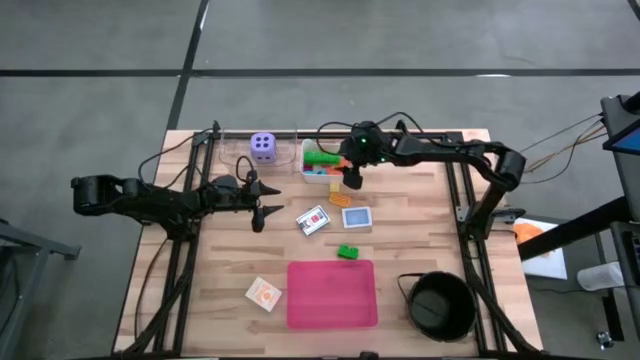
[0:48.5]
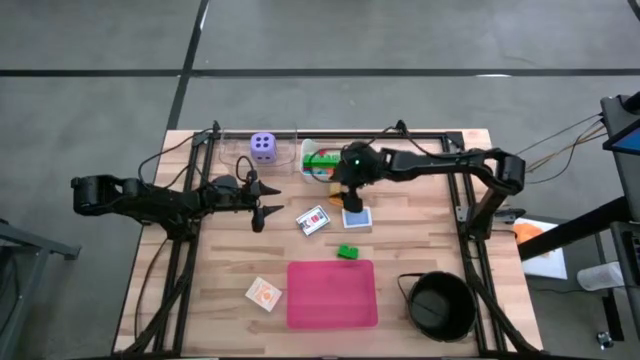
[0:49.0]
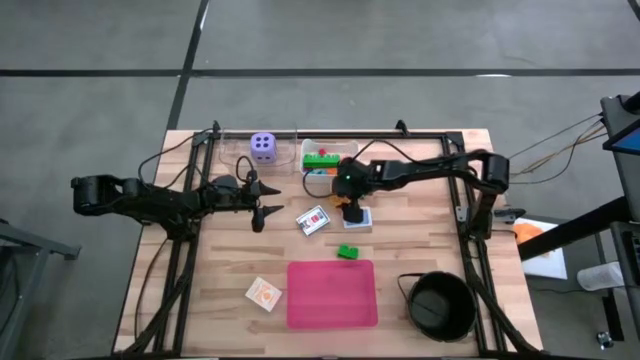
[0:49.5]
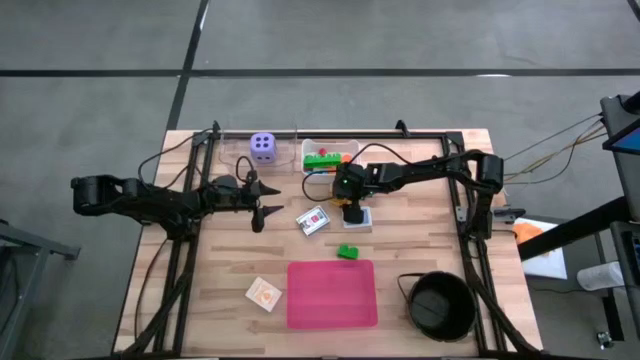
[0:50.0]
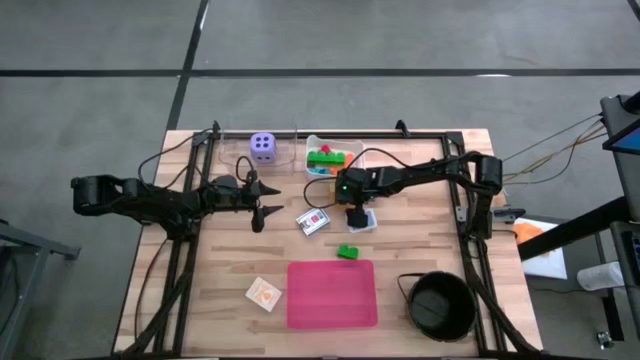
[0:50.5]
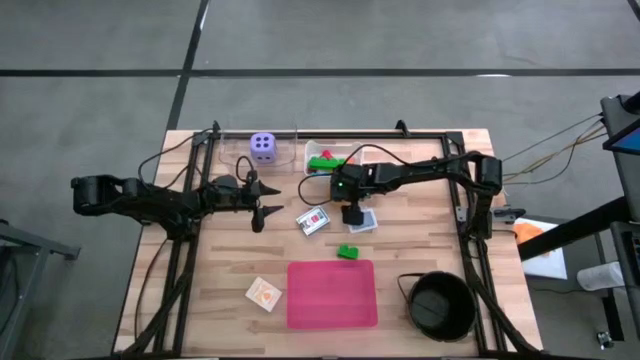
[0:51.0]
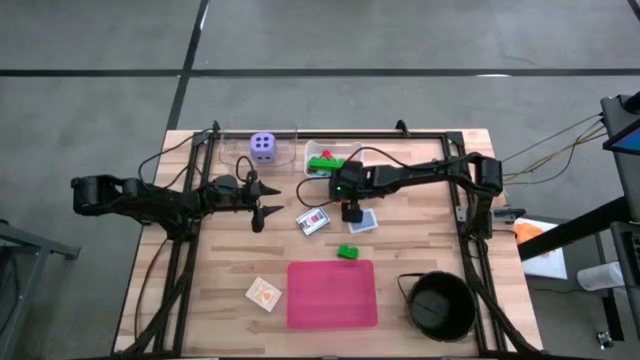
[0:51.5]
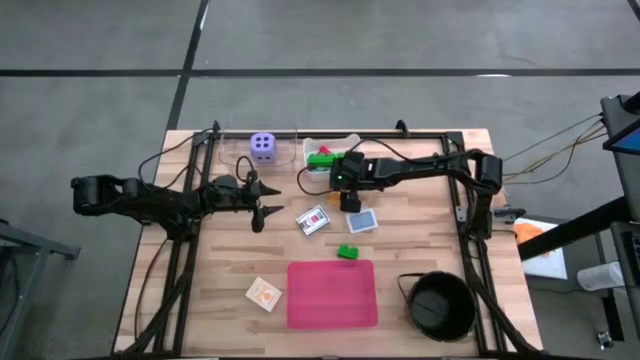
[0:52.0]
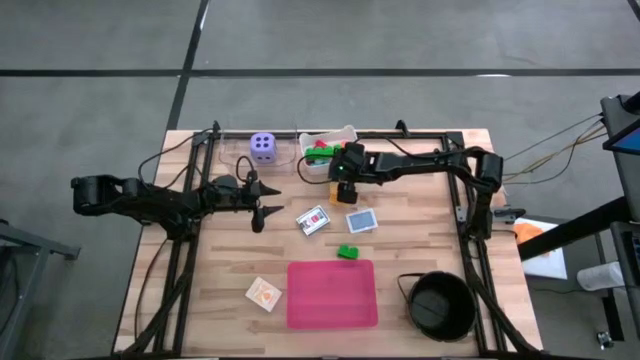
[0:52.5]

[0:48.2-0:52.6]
Task: Pick & Place Toys
Adjust the white bin

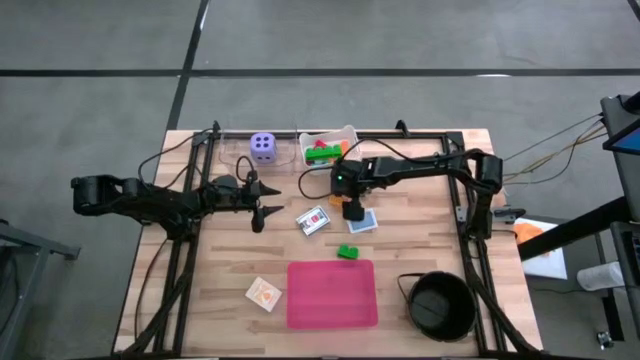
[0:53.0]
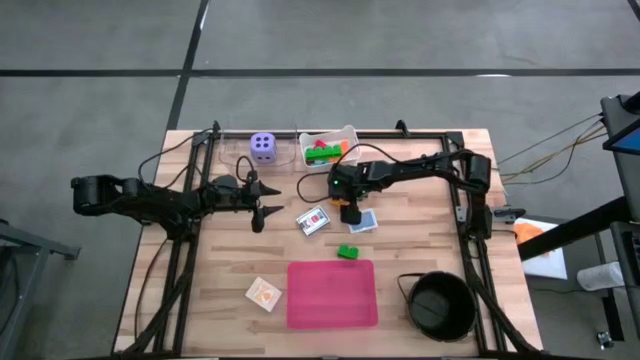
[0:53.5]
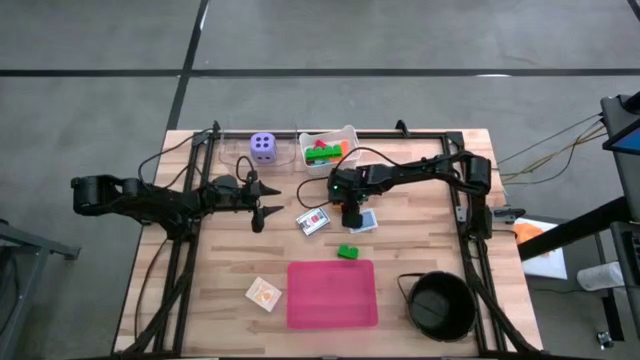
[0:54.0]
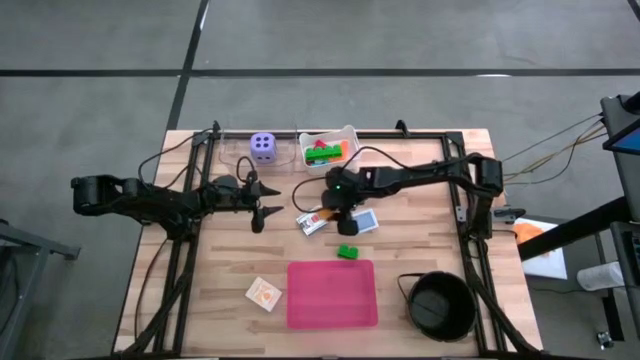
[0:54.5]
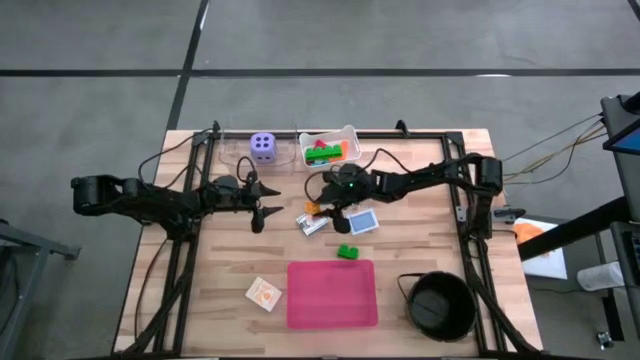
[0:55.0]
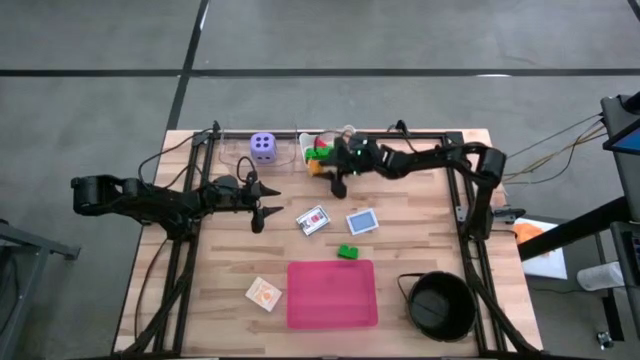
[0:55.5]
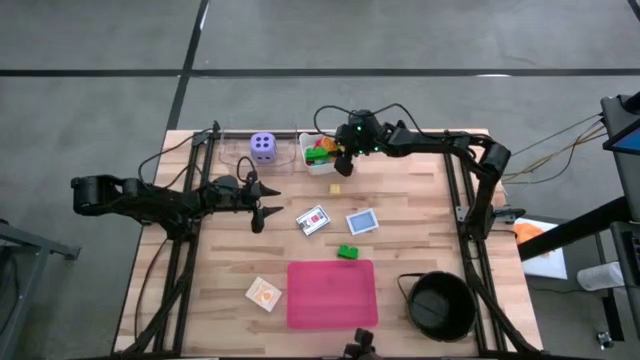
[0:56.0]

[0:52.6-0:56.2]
Put the orange four stud game piece into the white bin

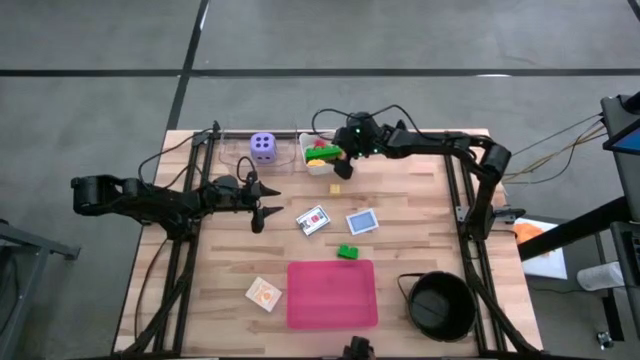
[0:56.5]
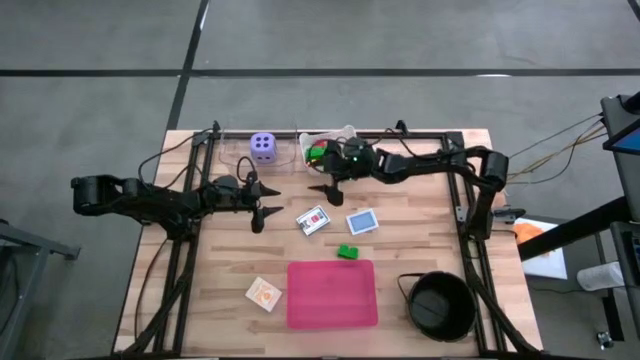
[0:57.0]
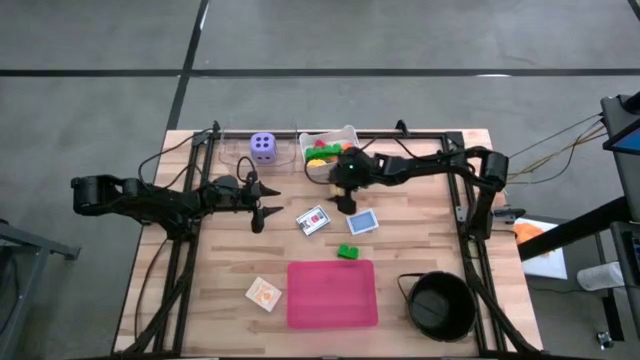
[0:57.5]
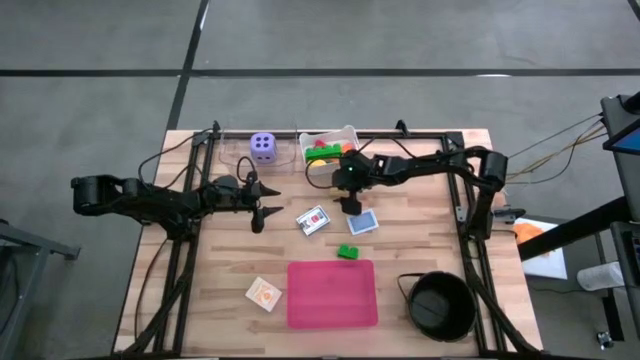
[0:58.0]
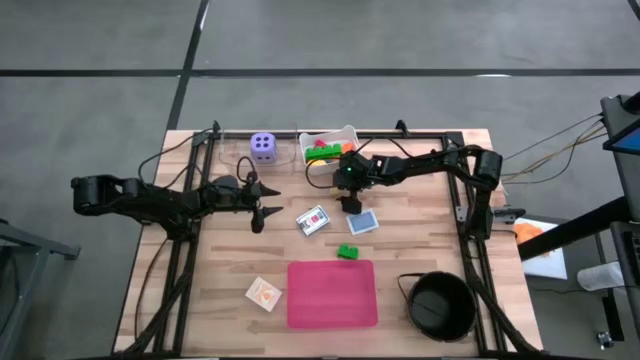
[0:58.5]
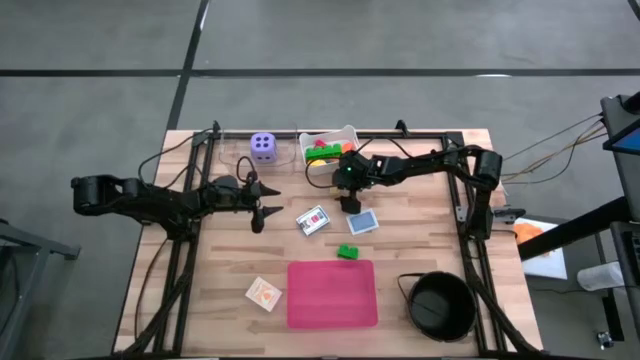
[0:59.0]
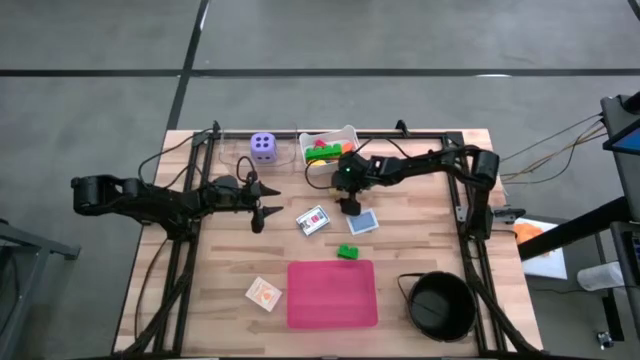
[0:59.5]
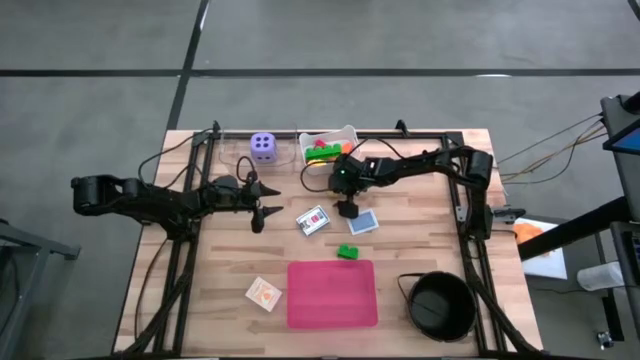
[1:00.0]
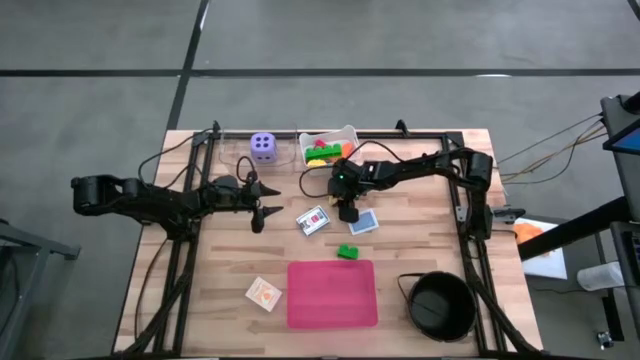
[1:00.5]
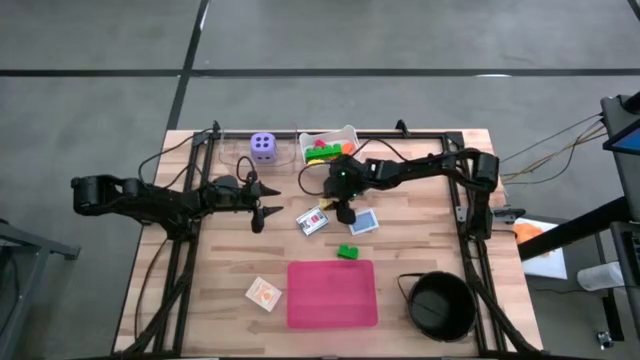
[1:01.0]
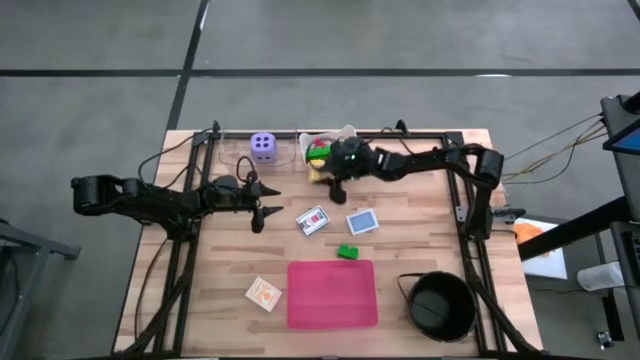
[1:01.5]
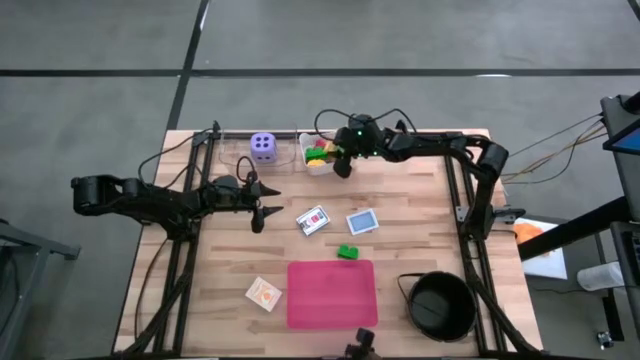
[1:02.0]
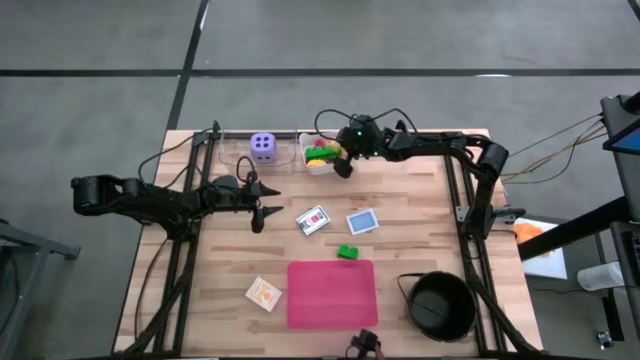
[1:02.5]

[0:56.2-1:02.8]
Put the yellow four stud game piece into the white bin

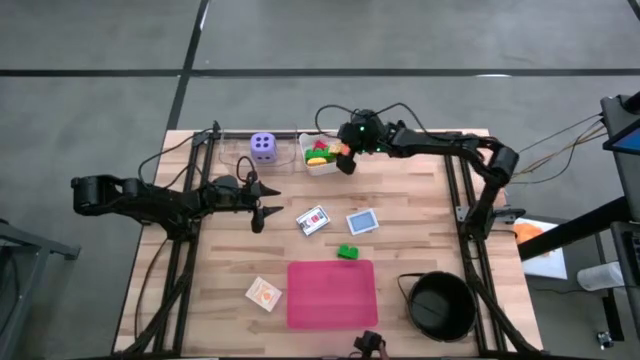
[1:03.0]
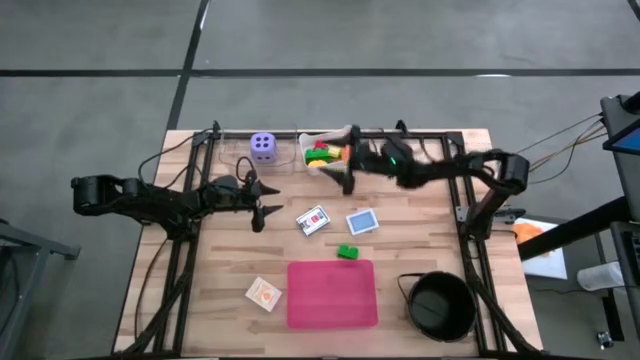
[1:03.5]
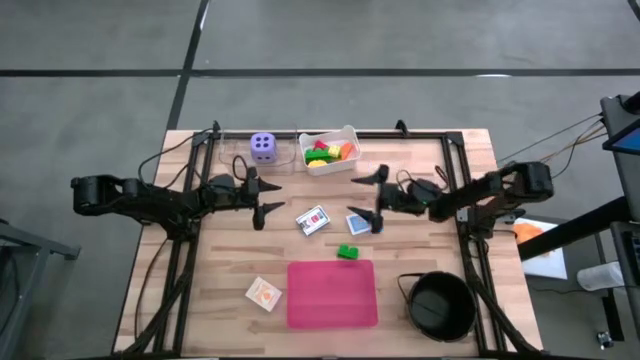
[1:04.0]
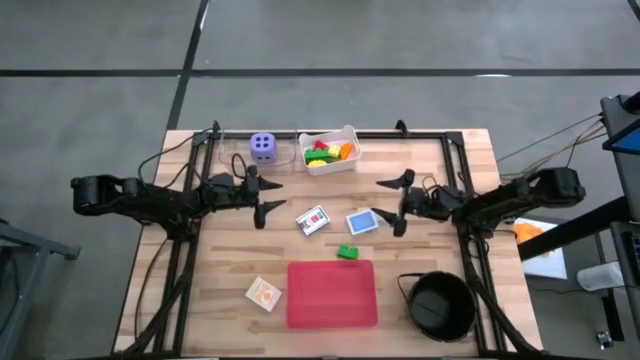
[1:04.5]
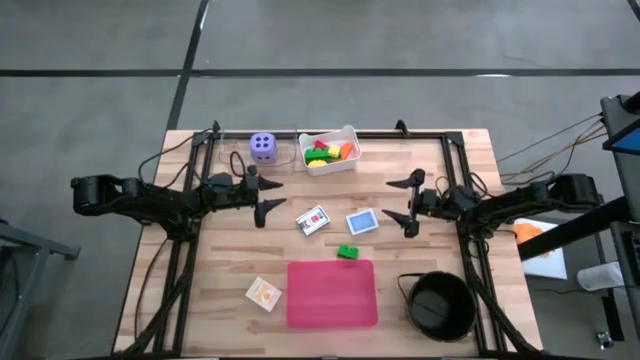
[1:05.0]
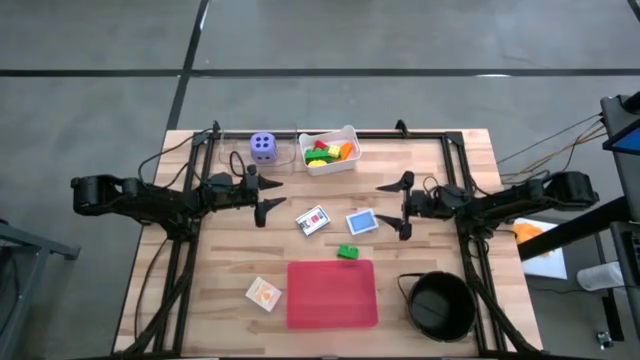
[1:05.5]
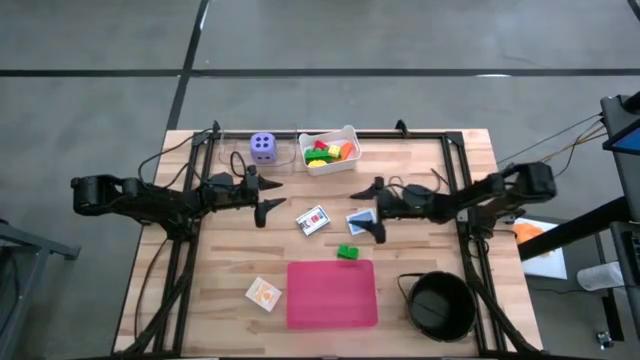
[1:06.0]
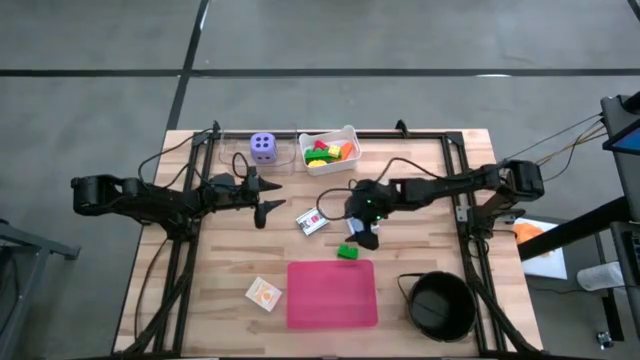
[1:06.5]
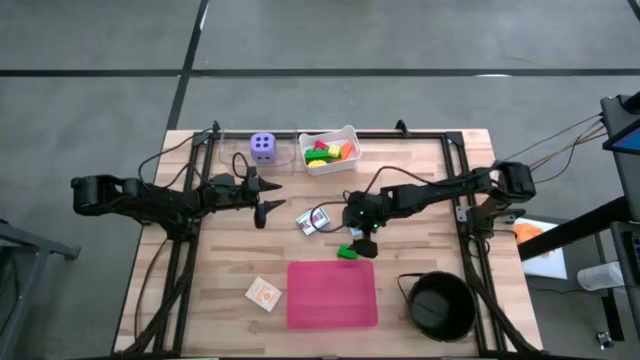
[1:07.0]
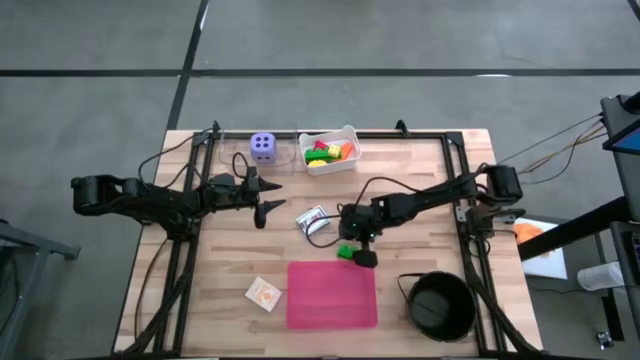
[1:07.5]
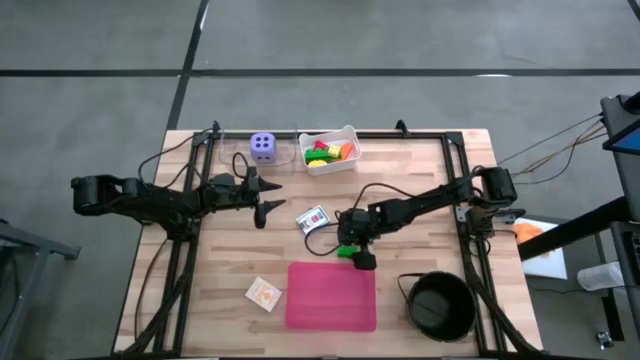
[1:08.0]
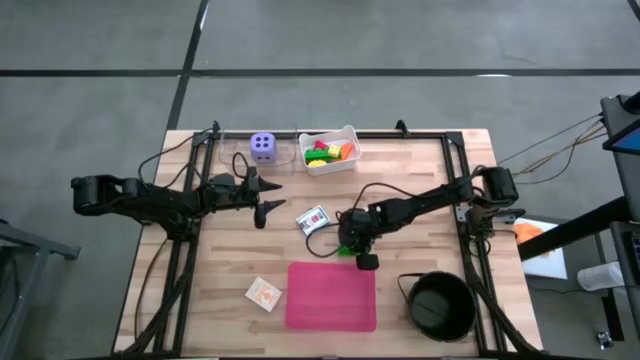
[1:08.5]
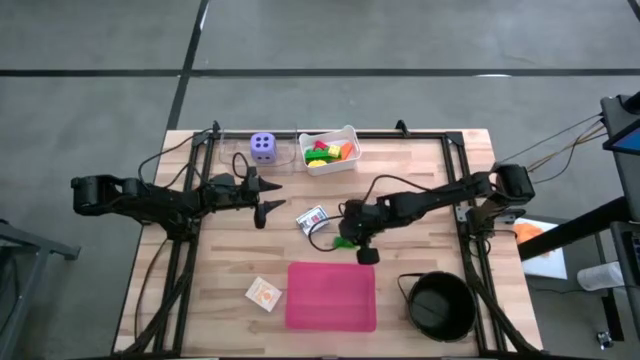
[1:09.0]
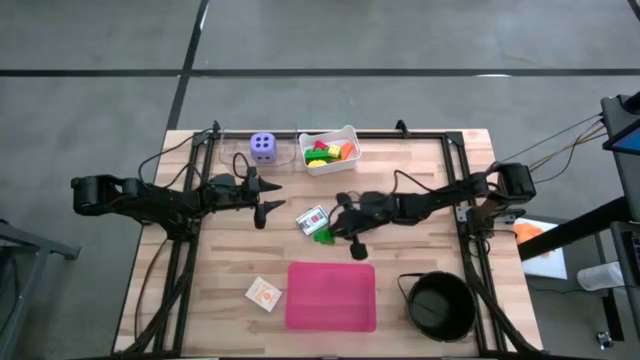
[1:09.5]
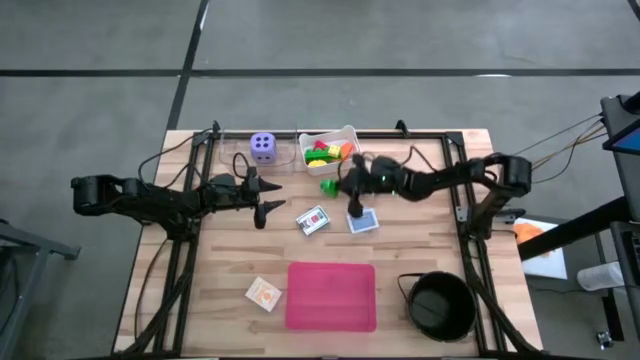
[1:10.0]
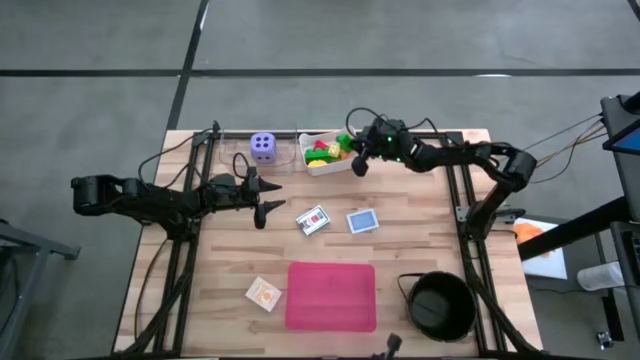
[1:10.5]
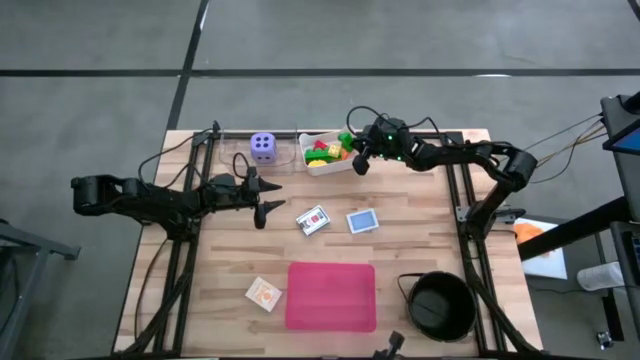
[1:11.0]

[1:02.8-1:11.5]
Put the green two stud game piece into the white bin
